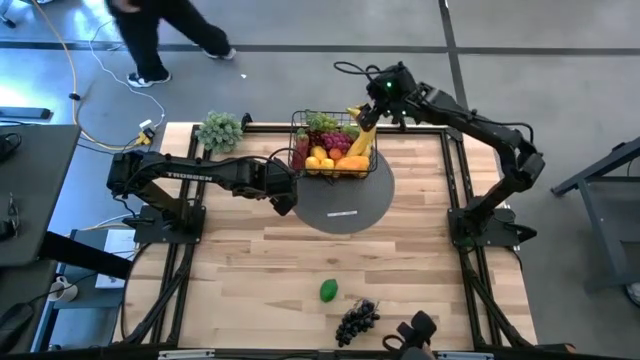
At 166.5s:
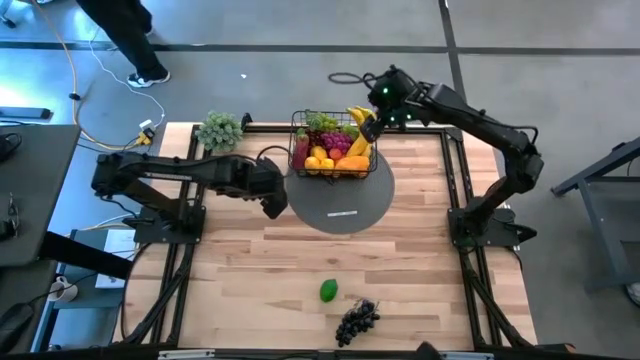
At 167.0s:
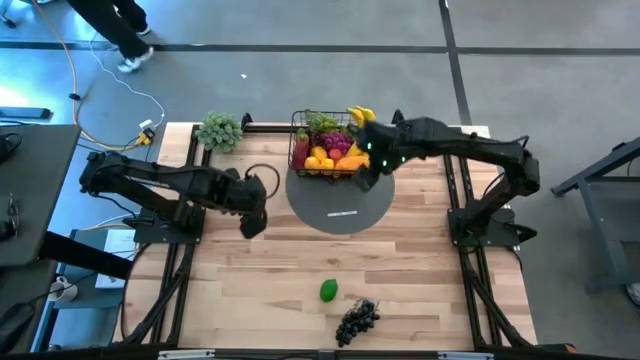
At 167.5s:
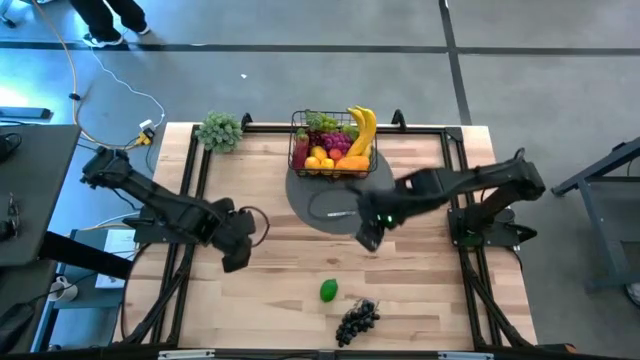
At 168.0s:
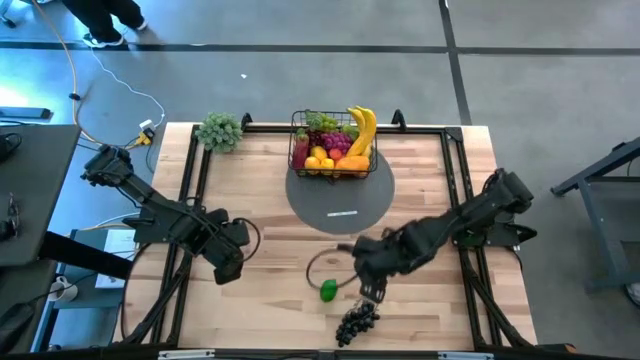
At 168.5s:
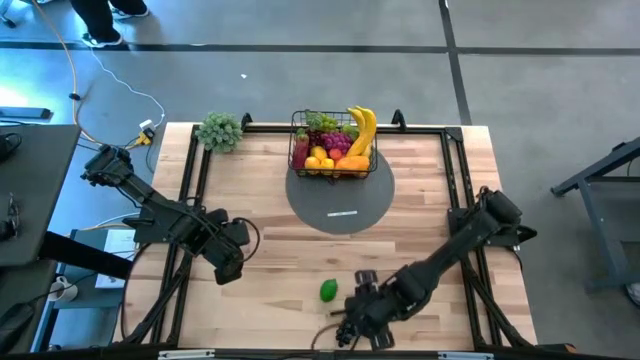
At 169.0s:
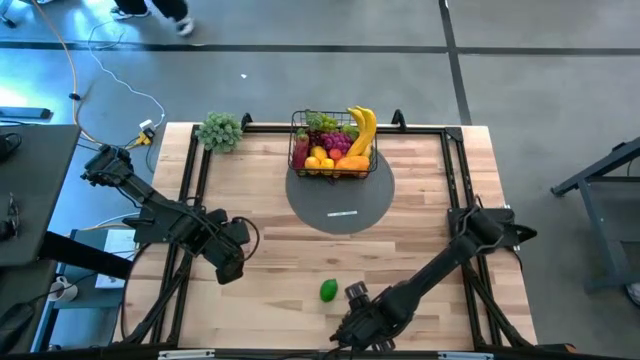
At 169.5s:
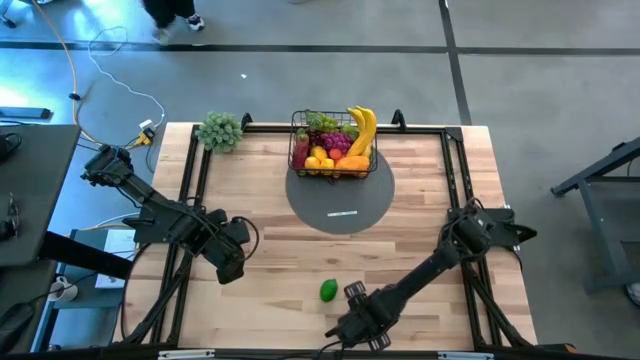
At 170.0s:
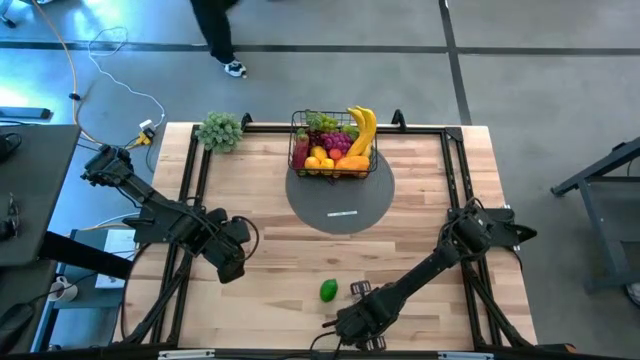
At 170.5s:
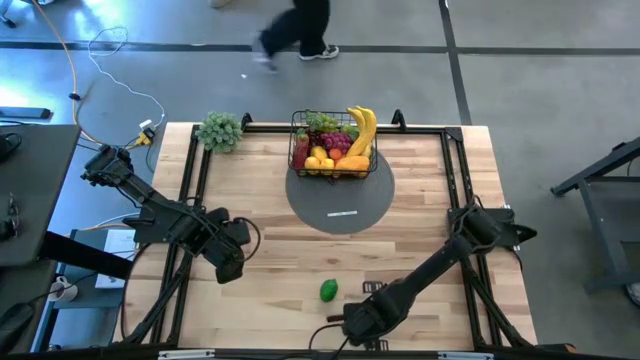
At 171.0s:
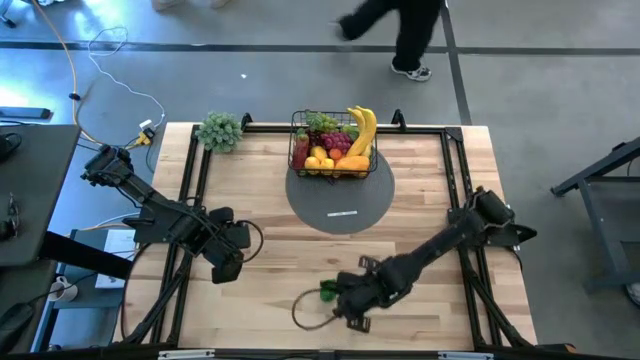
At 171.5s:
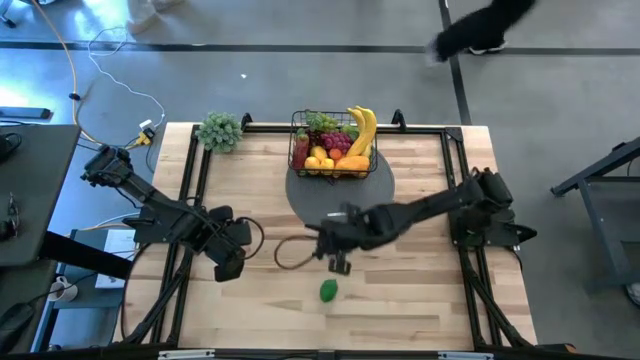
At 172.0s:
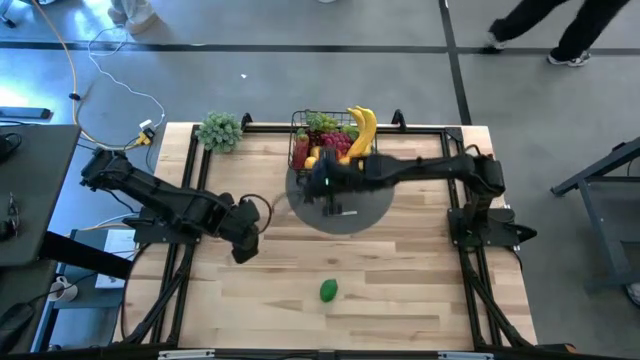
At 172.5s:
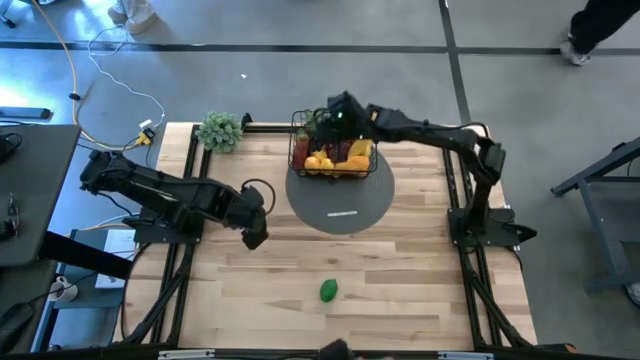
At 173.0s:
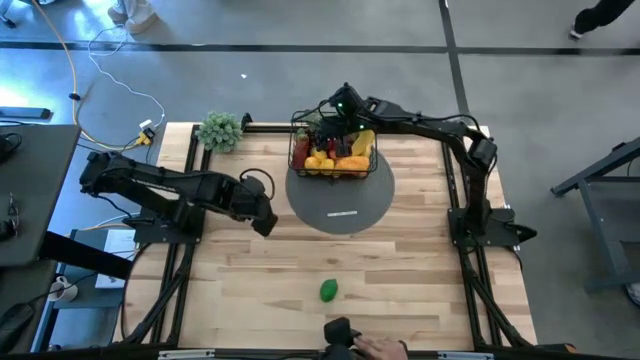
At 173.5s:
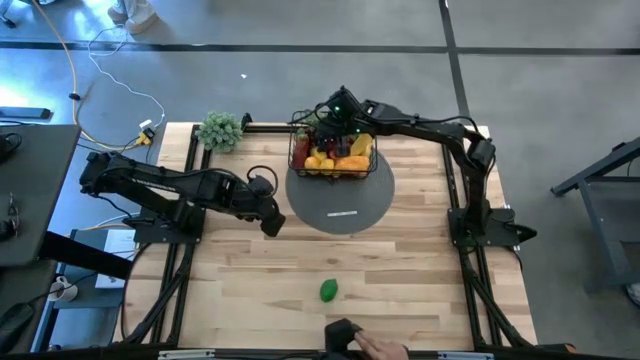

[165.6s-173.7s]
Task: Build produce basket
Put the grapes into the wire basket

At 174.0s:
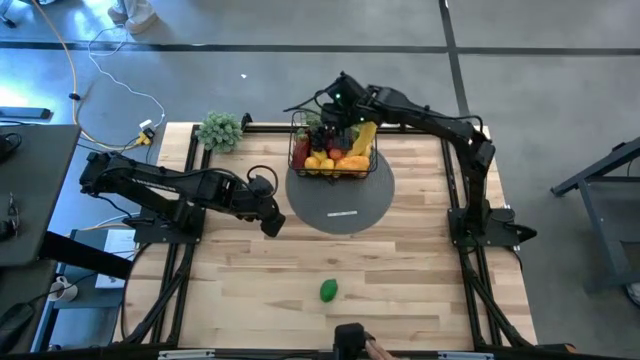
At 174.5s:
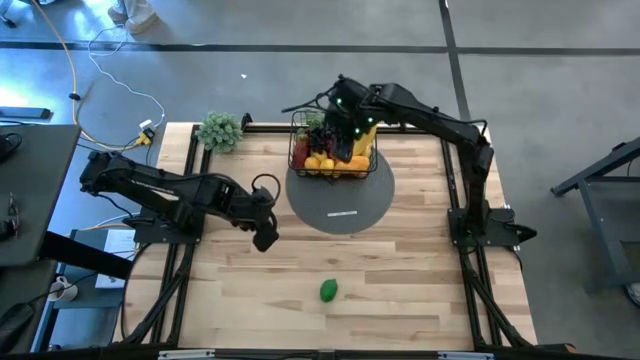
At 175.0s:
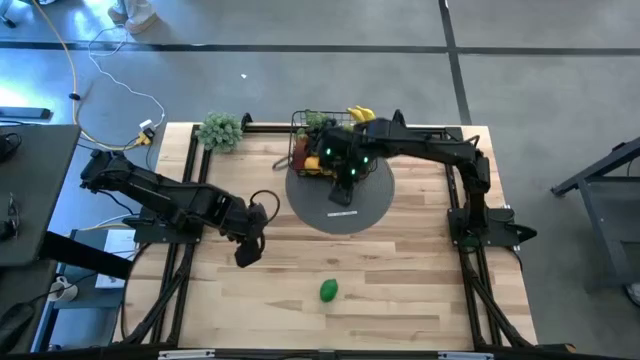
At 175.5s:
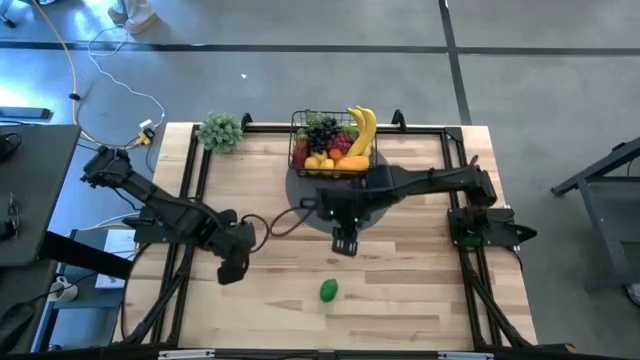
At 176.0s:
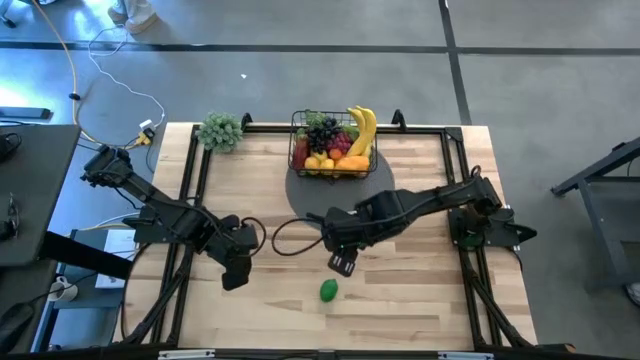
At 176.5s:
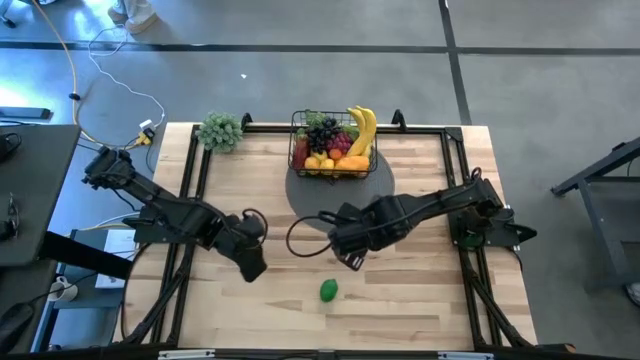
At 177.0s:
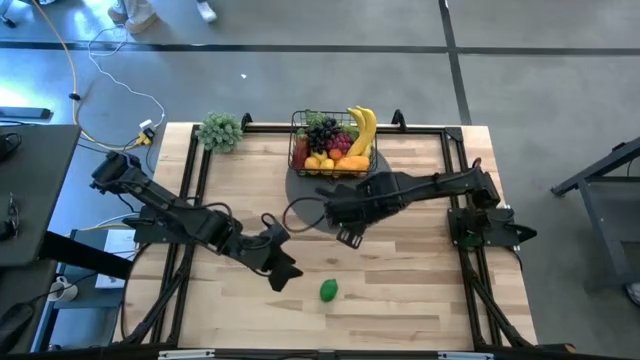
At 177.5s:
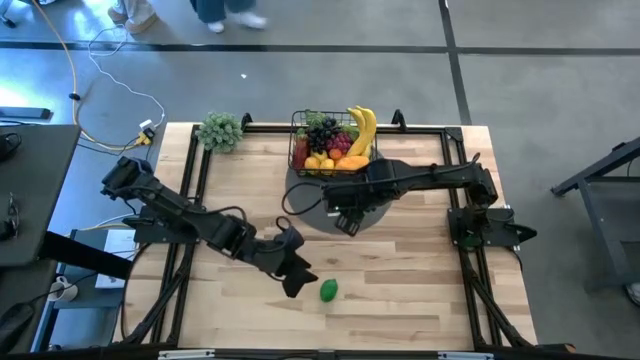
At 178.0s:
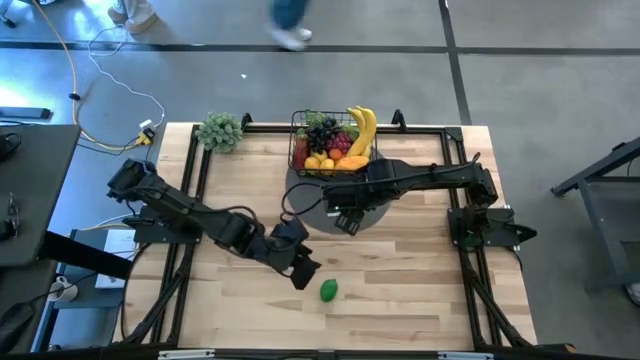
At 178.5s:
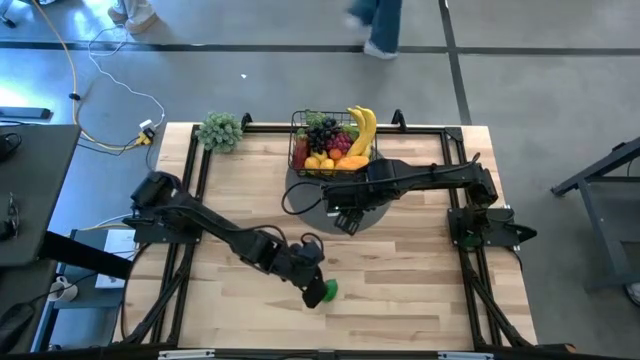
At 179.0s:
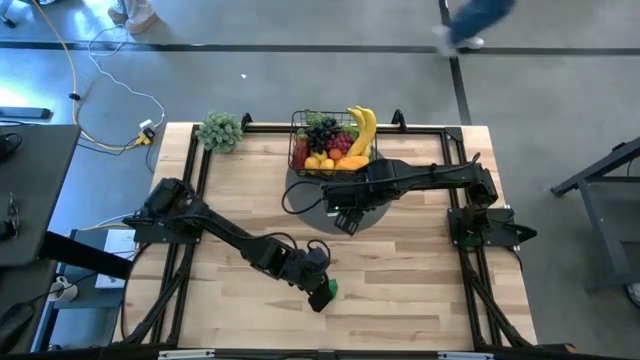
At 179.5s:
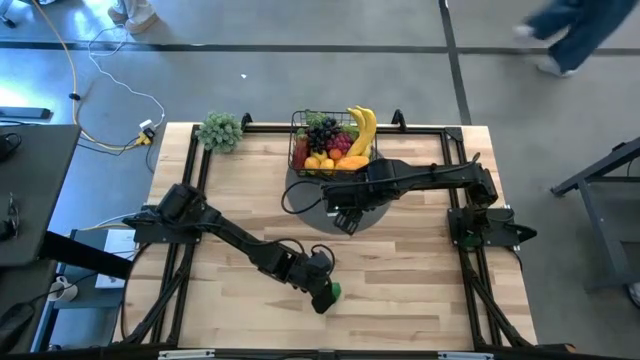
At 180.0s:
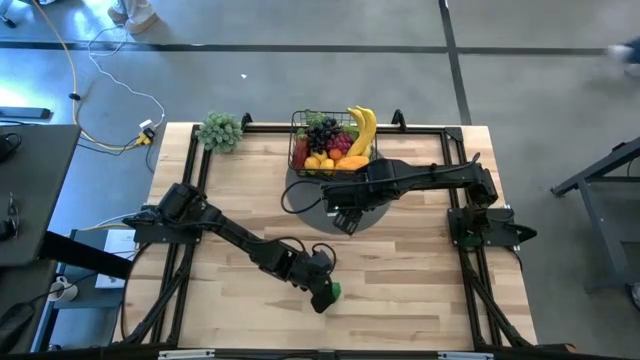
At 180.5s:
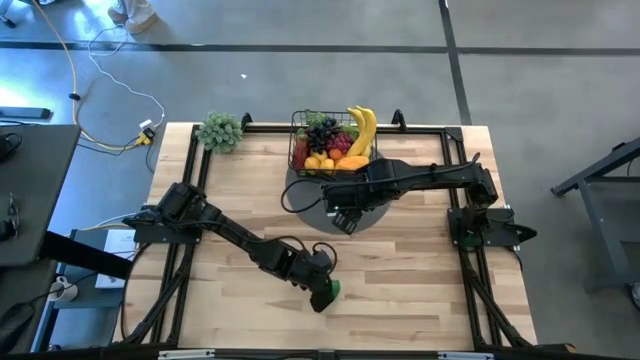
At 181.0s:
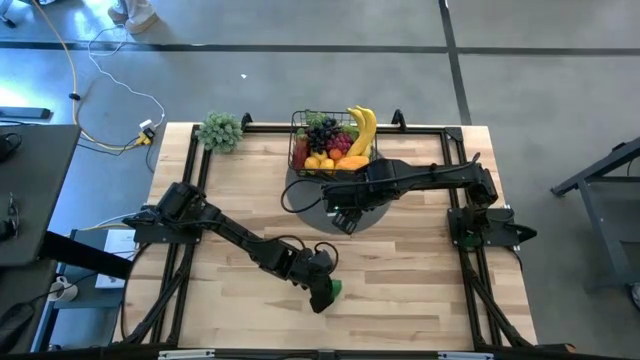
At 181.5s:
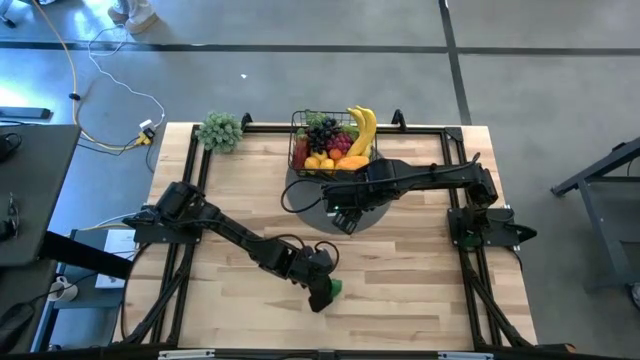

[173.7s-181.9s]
Put the lime into the wire basket

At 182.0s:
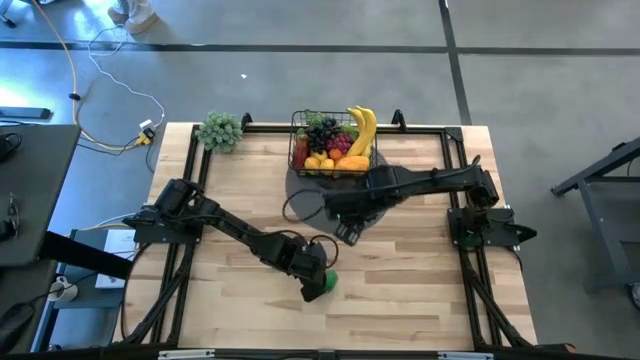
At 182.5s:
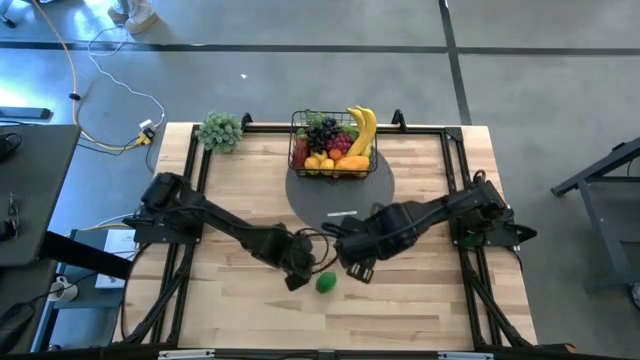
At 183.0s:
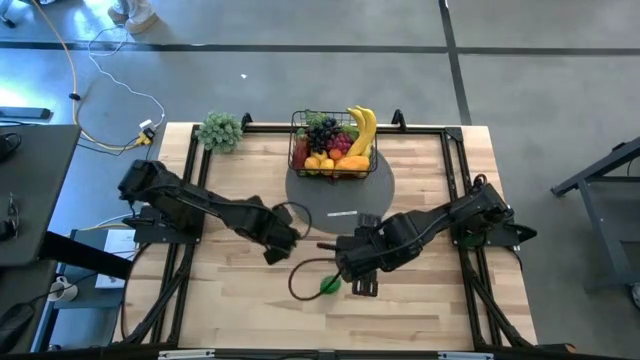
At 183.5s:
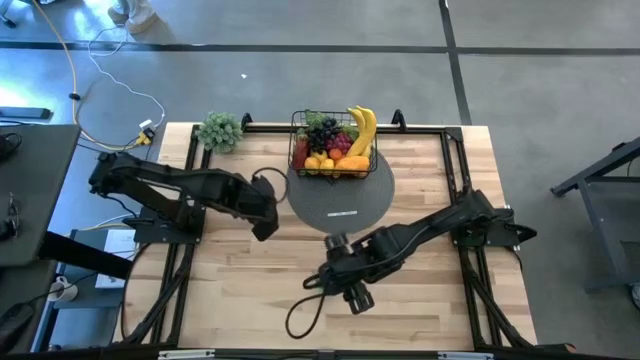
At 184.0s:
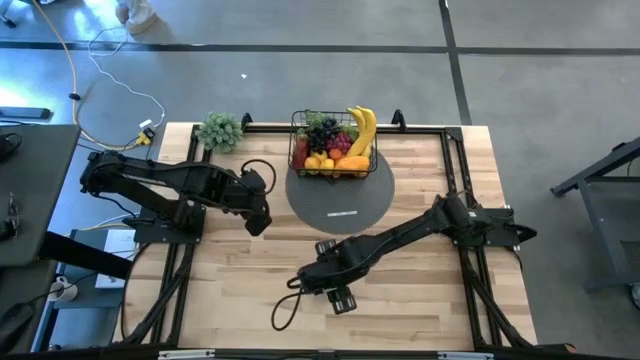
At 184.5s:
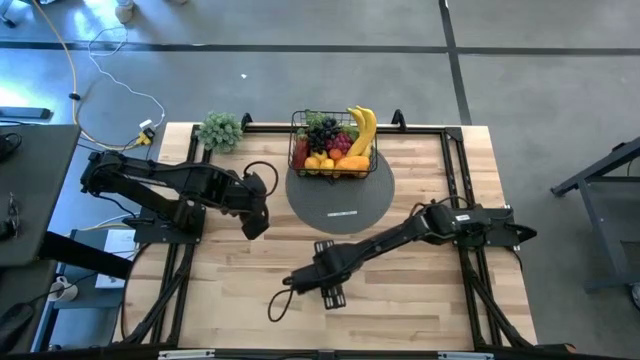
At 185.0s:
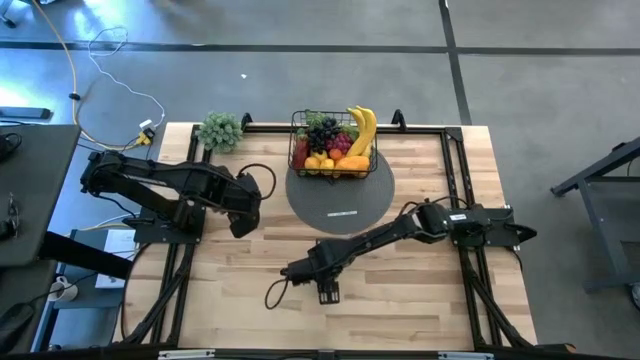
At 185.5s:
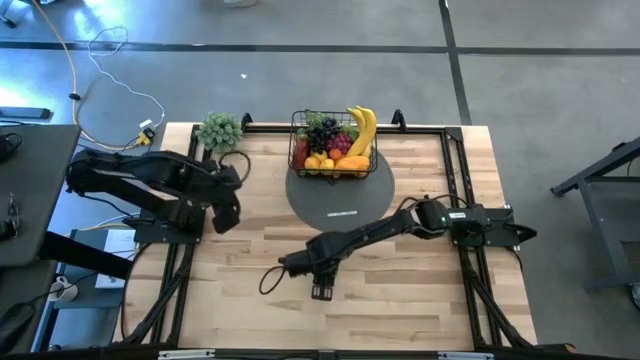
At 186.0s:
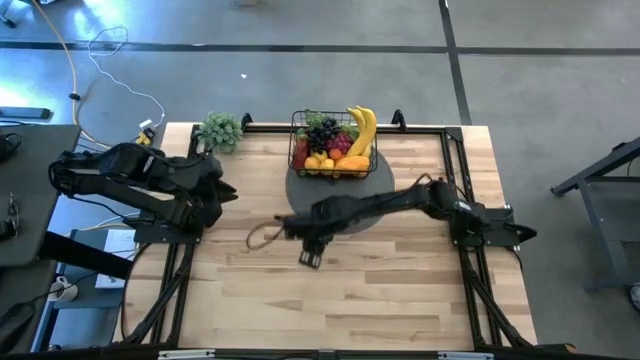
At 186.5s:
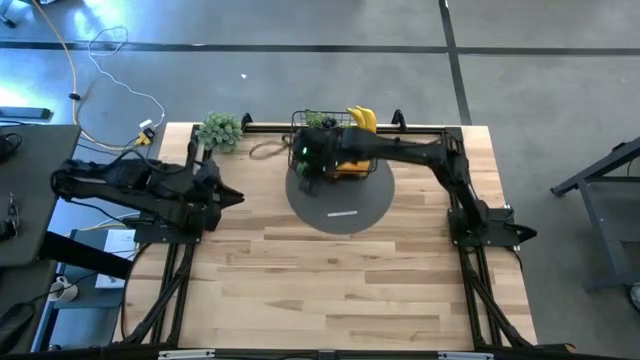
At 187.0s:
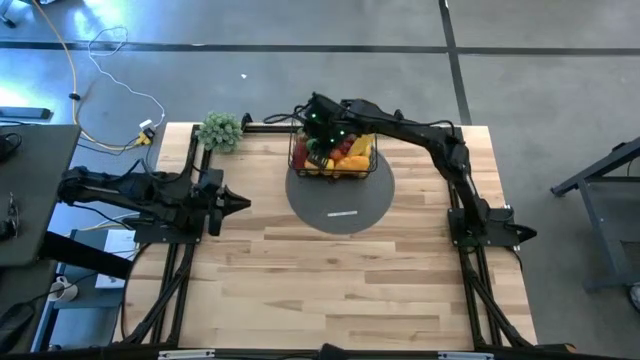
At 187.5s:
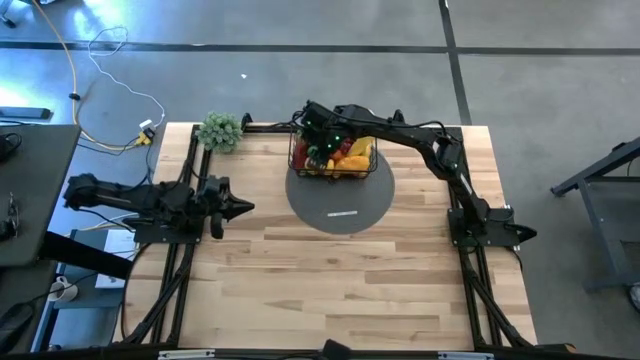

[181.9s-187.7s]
Put the lime into the wire basket
